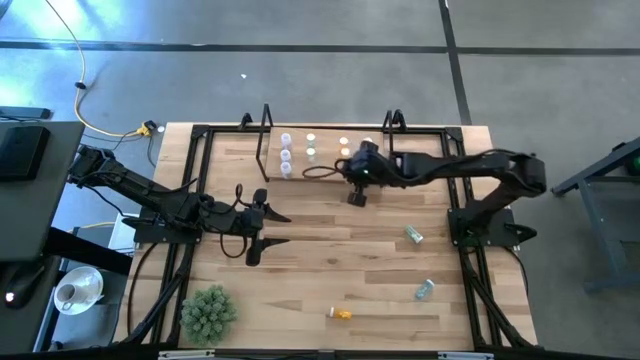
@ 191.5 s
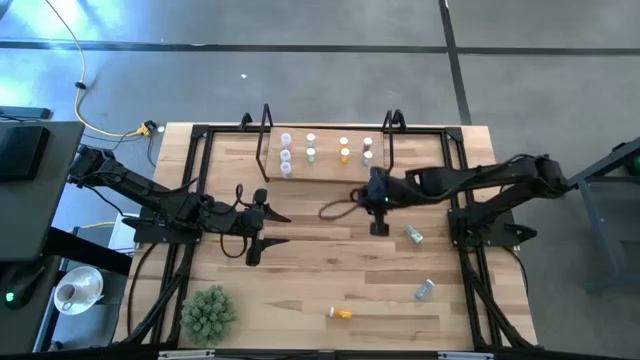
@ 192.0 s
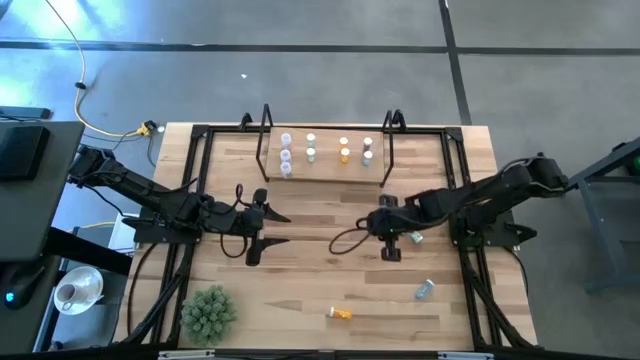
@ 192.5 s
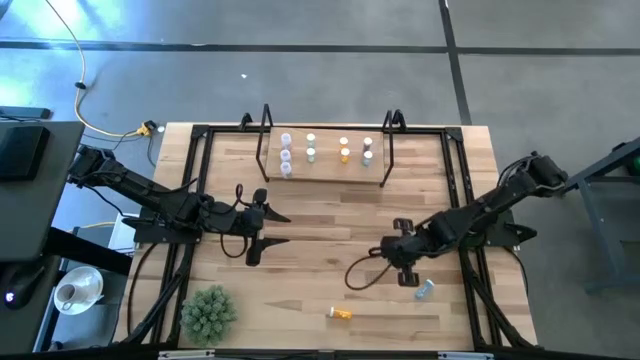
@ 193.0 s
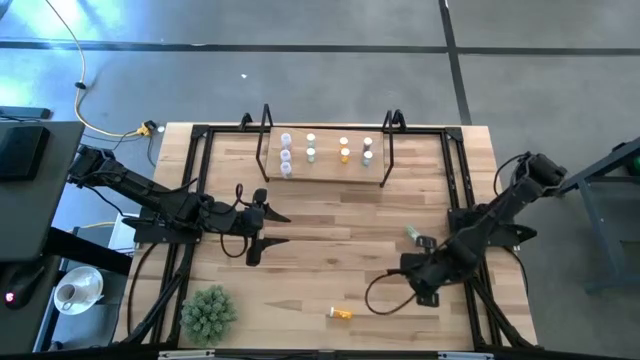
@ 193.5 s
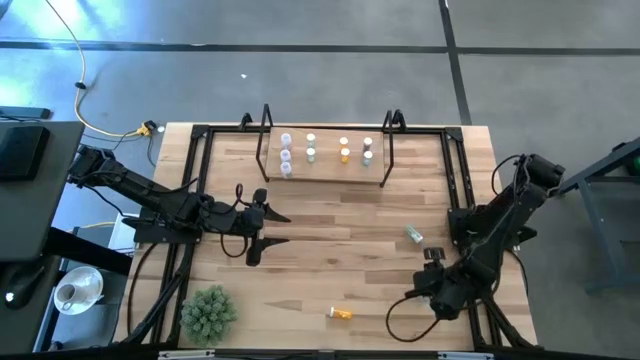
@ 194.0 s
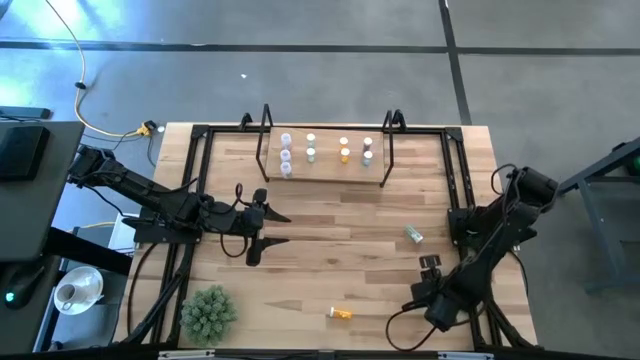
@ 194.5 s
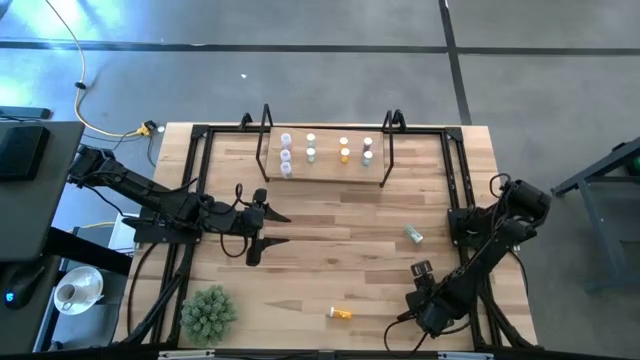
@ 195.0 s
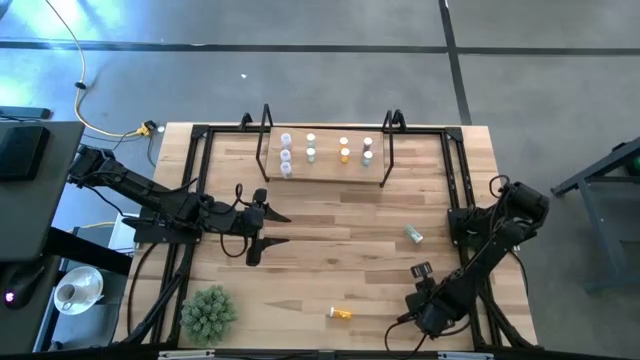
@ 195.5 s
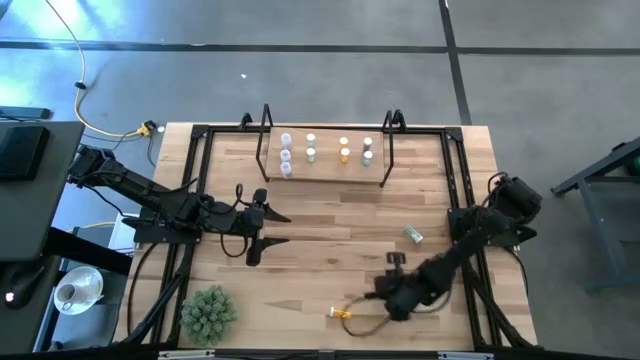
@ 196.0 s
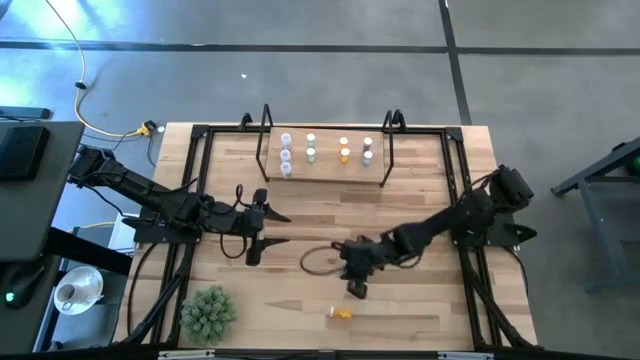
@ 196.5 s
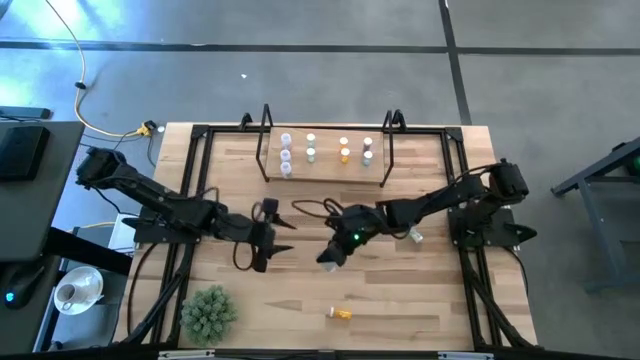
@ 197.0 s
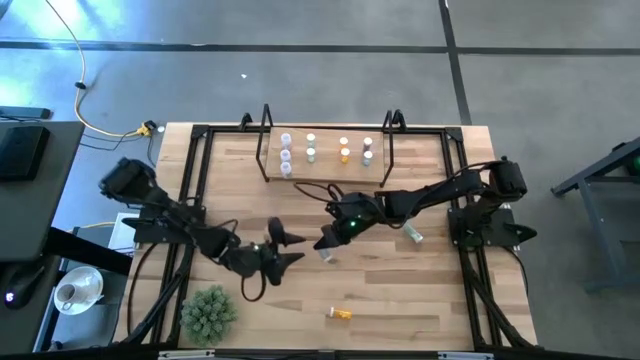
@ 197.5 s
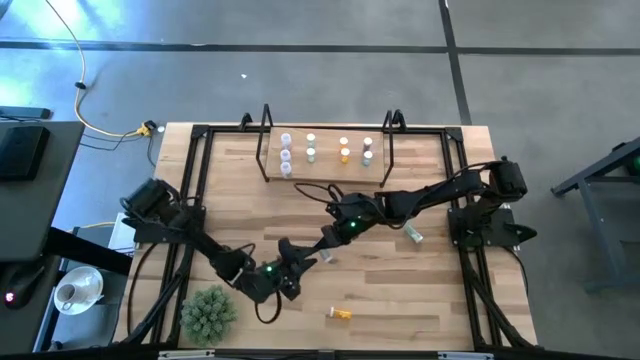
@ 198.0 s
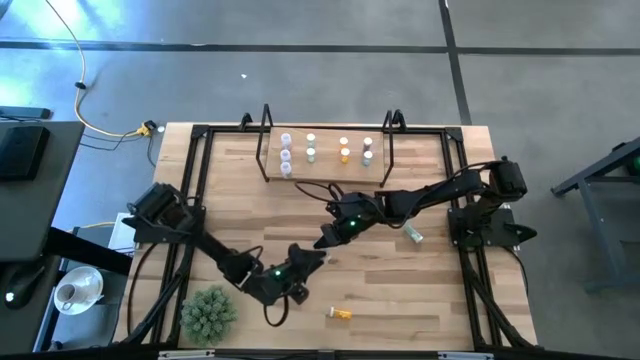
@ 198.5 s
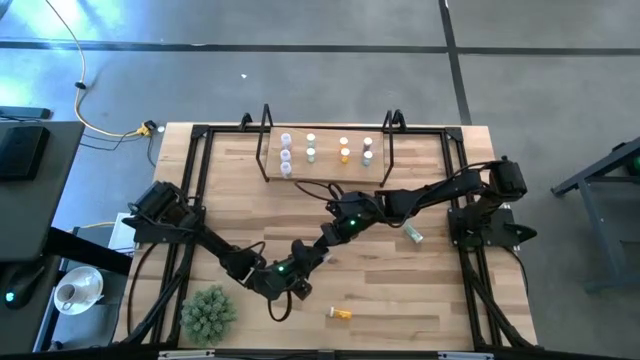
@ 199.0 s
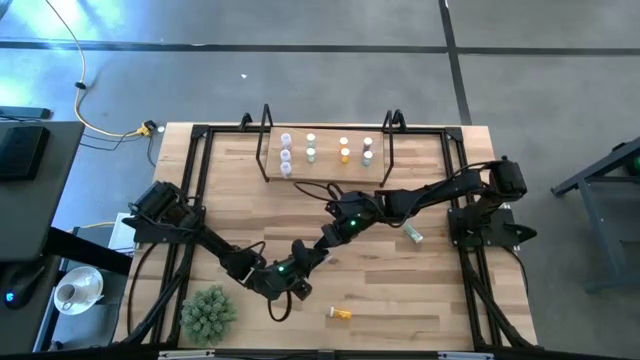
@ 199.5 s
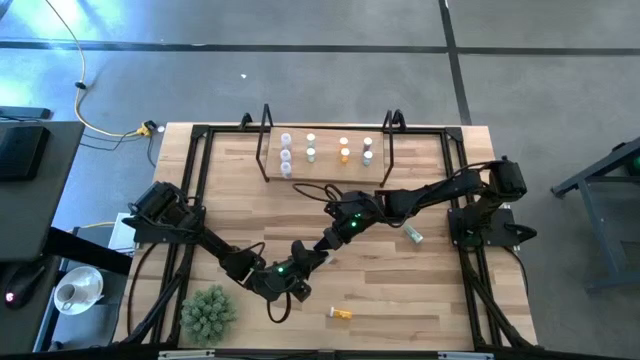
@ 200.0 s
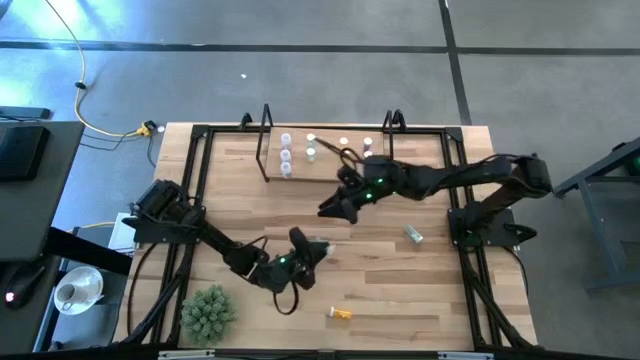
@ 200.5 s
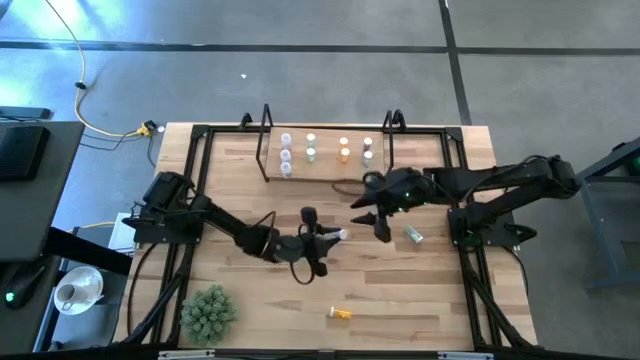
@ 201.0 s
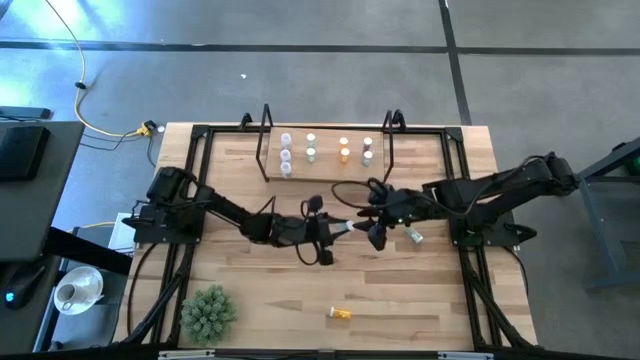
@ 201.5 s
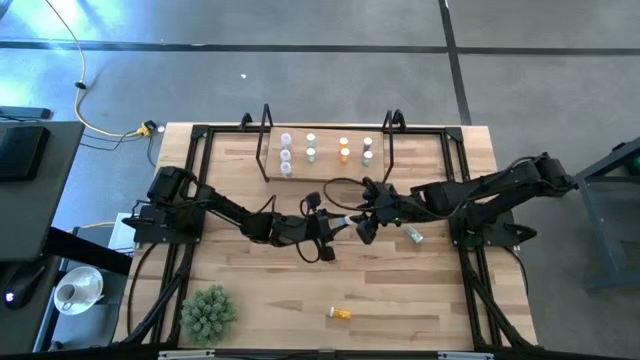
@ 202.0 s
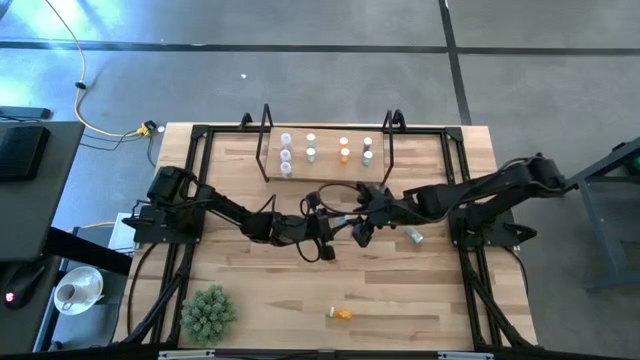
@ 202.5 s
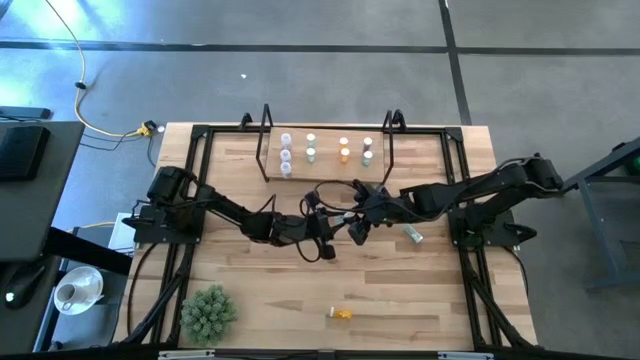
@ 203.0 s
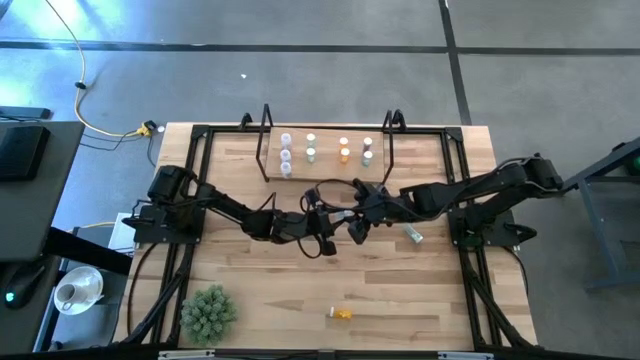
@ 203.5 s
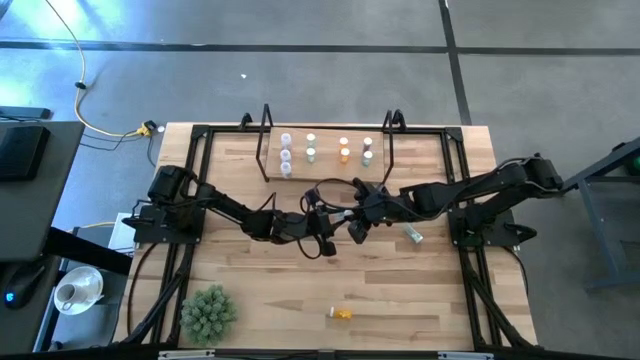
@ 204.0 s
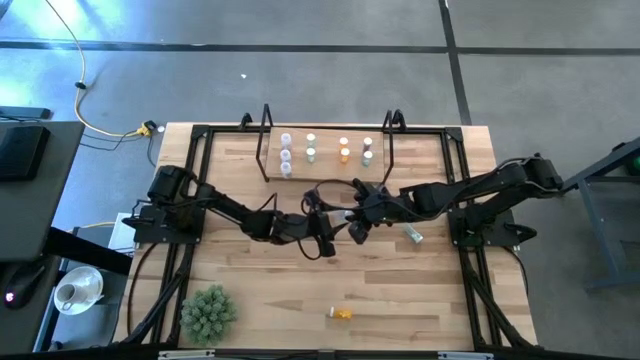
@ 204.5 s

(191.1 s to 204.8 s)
Task: Pick and place medicine bottles onto shelf by color
Put the blue pill bottle on the shelf aligned with the other blue pill bottles

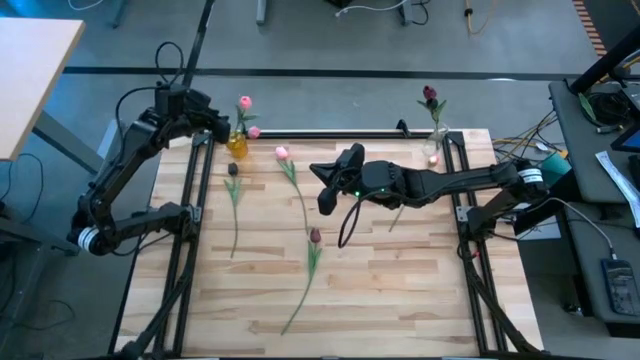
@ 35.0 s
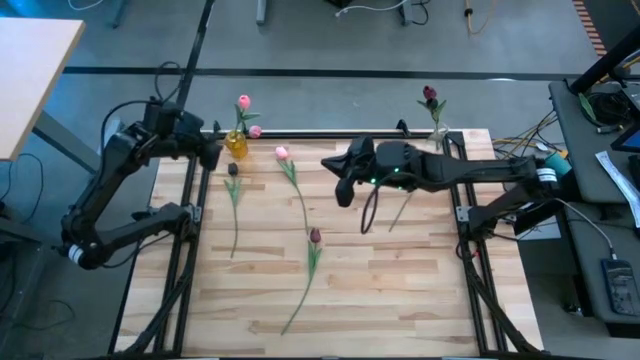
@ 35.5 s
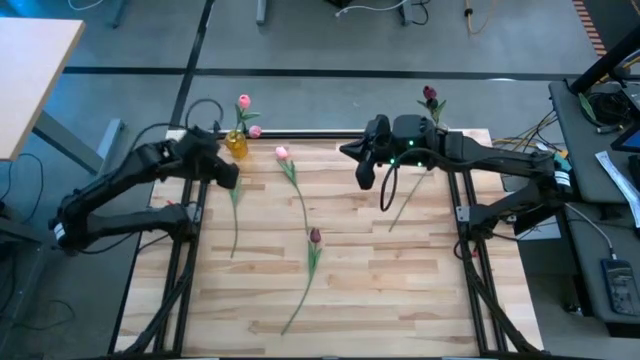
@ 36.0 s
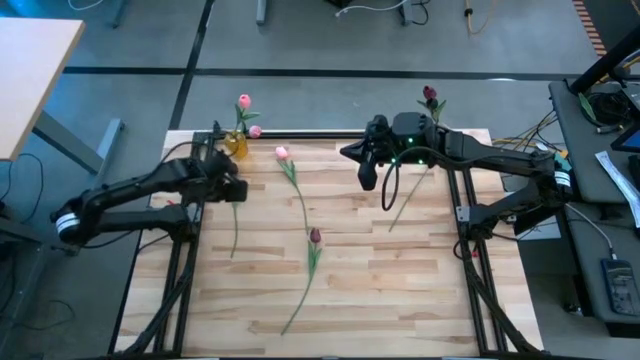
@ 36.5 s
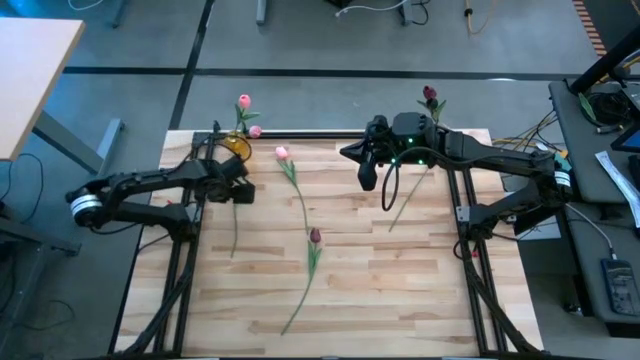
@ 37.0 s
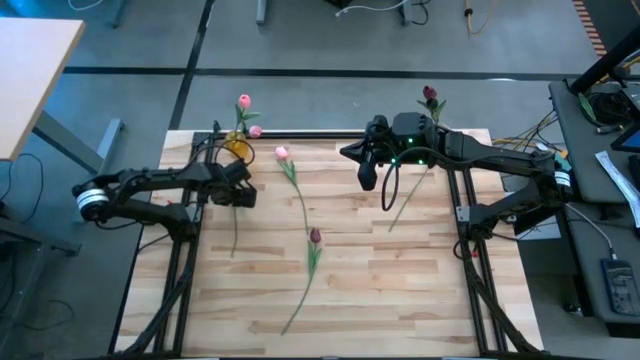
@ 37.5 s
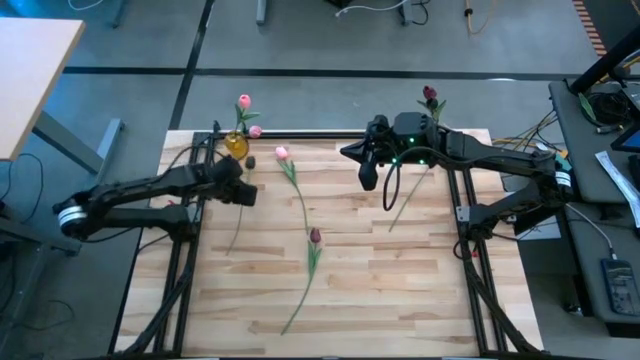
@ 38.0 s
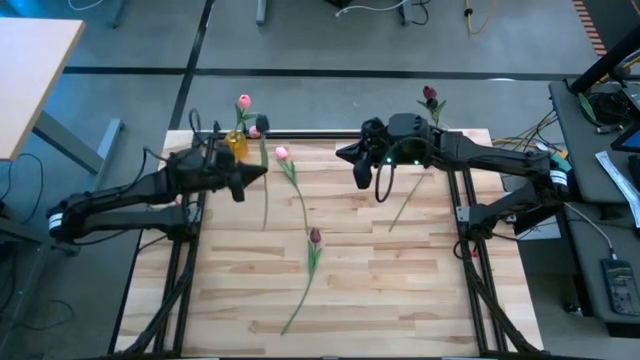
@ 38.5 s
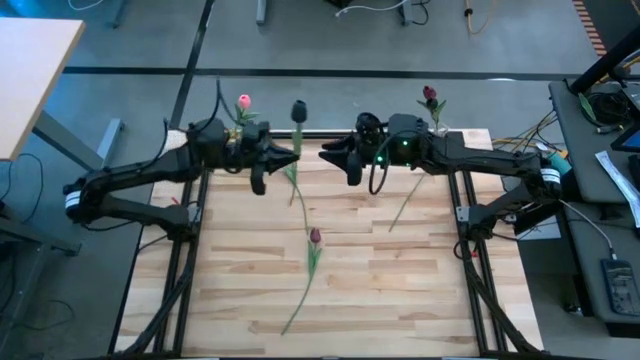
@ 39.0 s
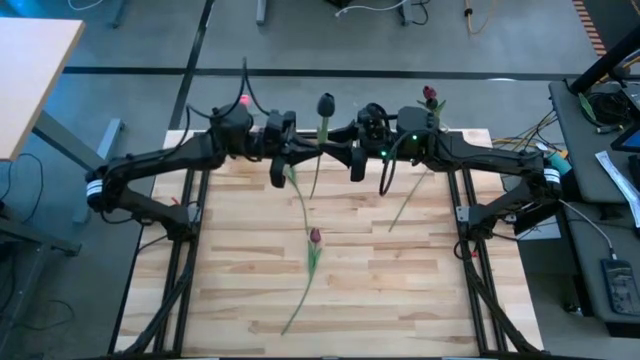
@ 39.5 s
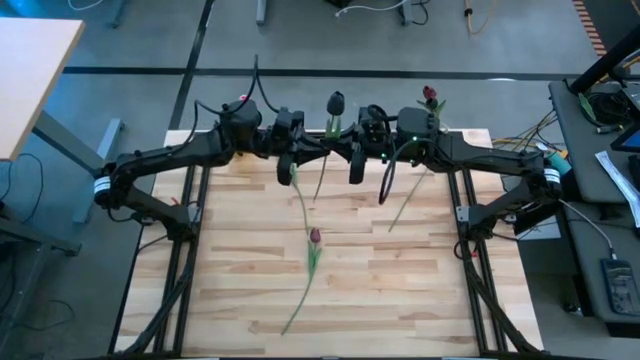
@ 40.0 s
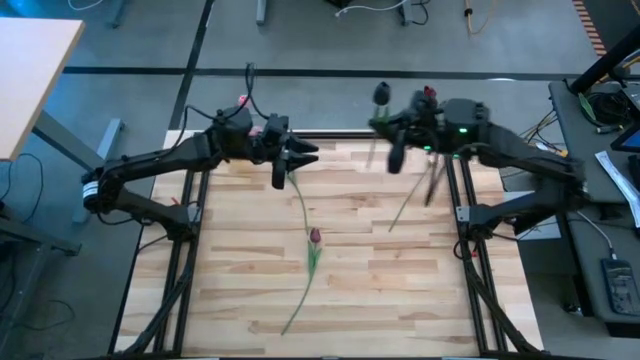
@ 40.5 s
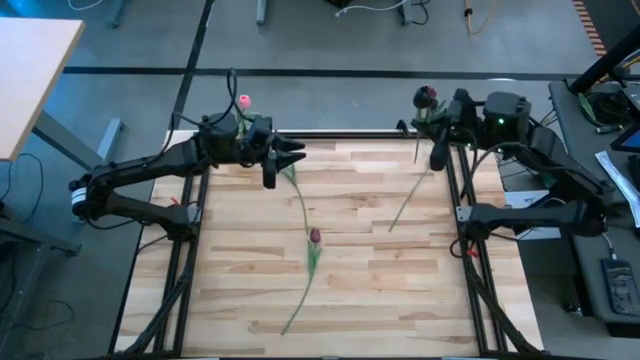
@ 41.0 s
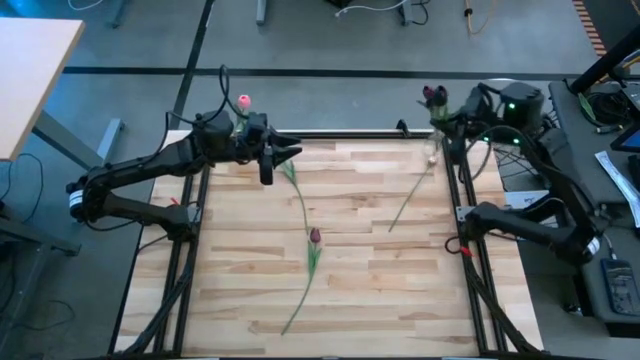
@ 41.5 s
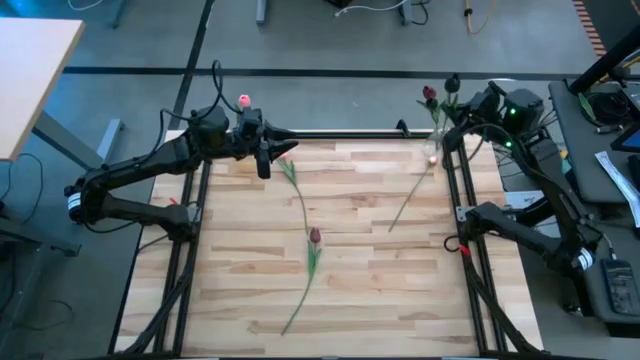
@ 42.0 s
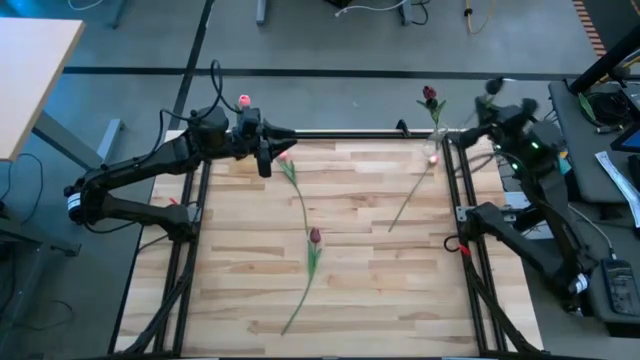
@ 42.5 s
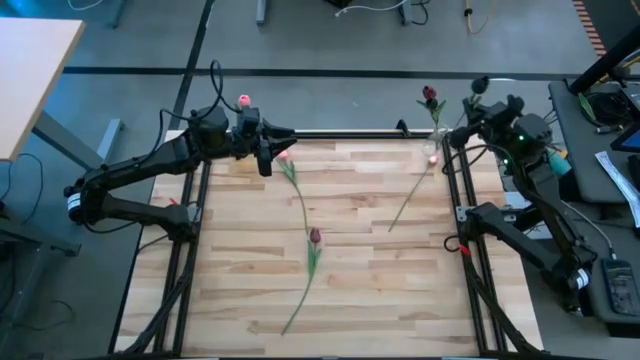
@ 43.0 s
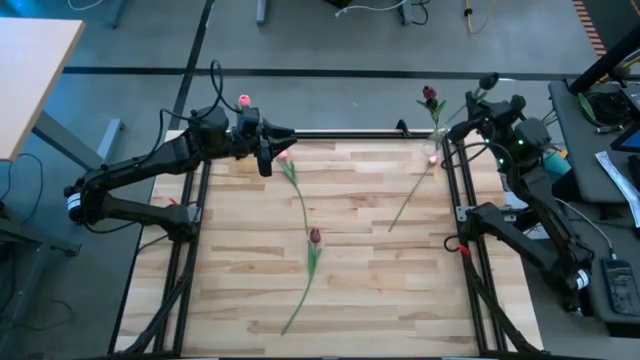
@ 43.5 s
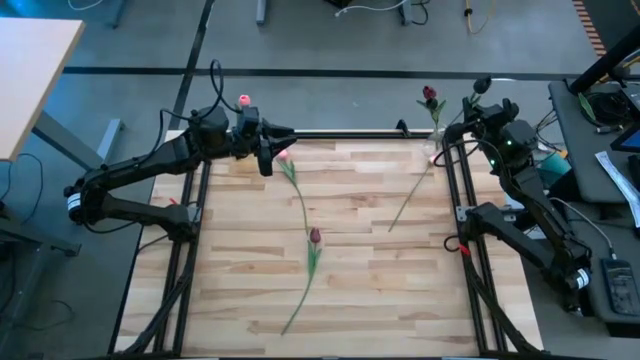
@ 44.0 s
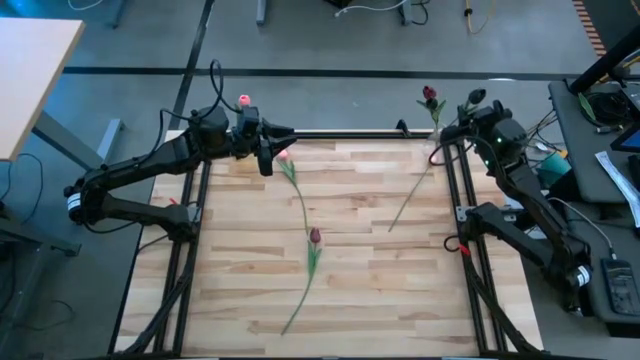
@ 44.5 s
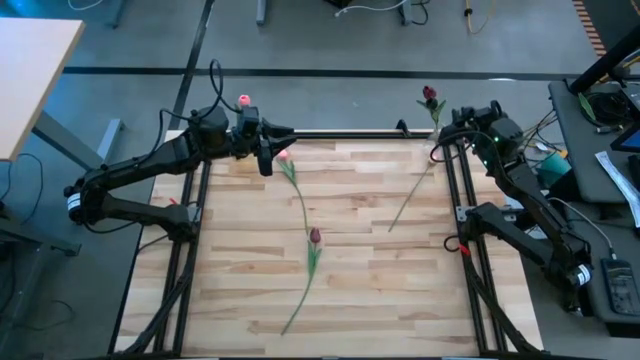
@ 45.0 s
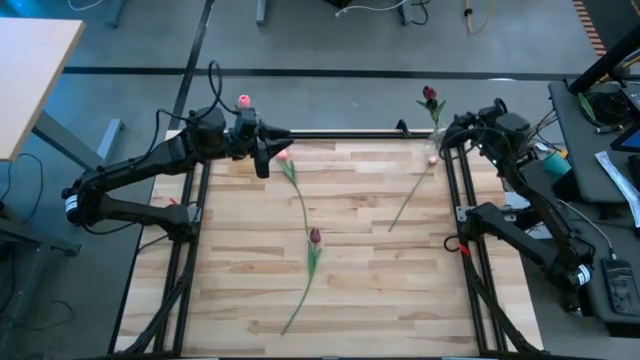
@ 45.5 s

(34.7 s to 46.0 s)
Task: Sort flowers into vase by color
Put the black tulip into the transparent vase
